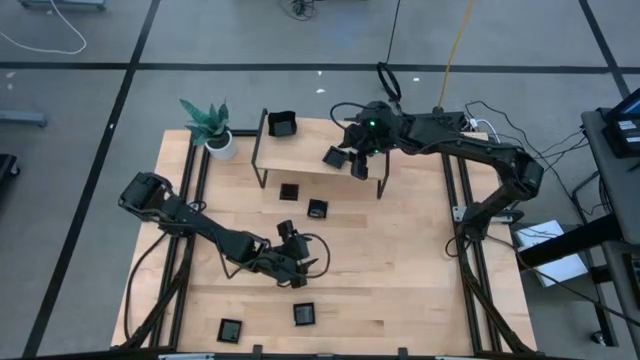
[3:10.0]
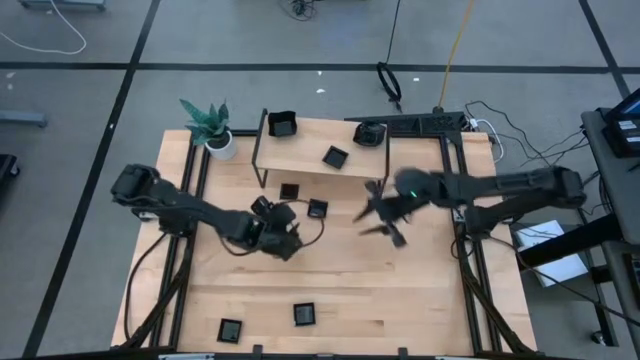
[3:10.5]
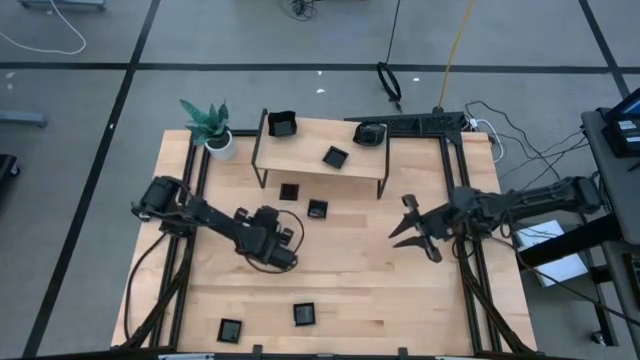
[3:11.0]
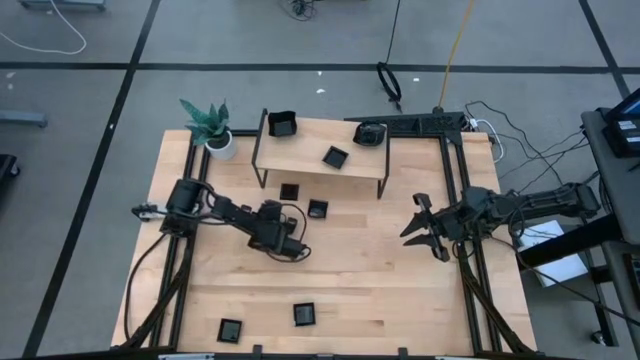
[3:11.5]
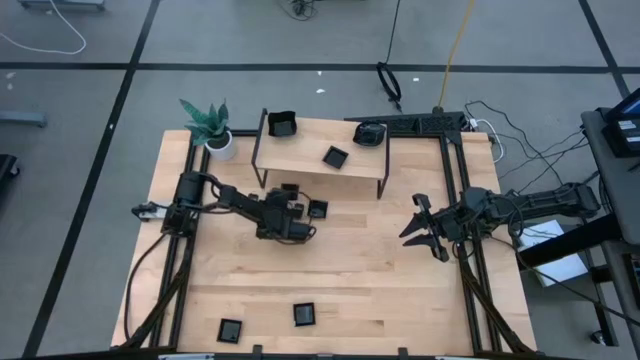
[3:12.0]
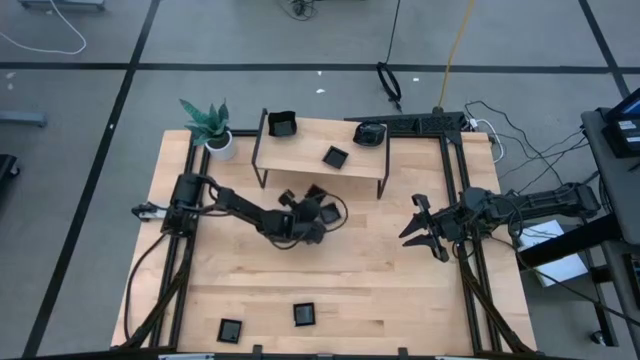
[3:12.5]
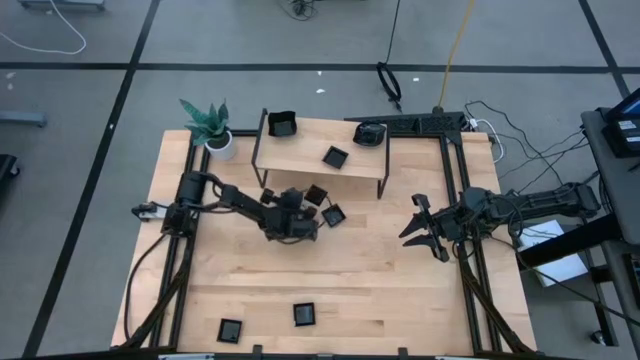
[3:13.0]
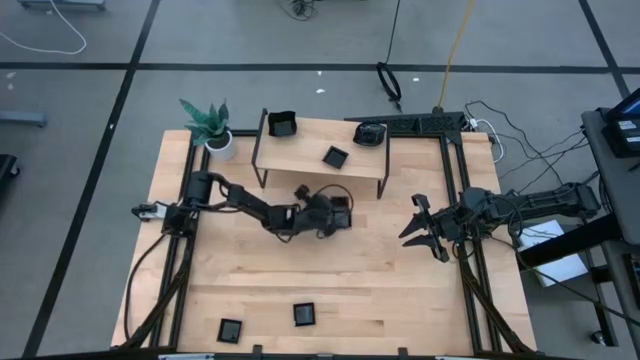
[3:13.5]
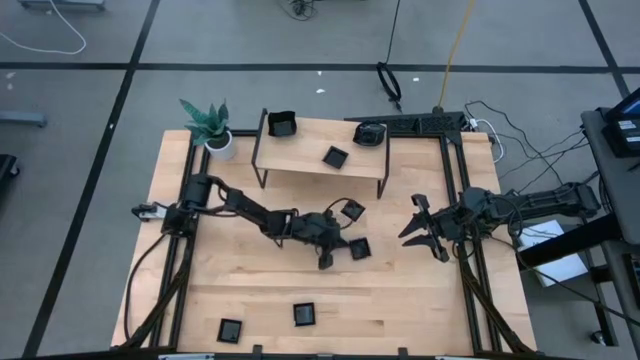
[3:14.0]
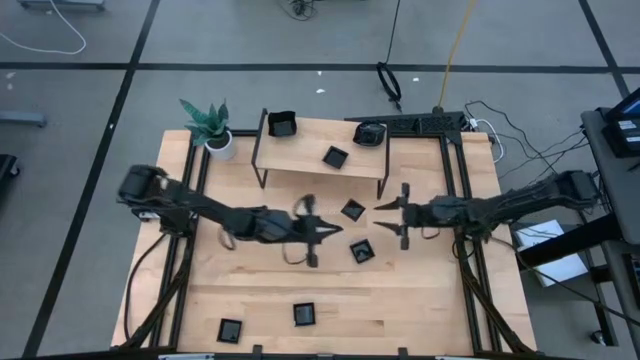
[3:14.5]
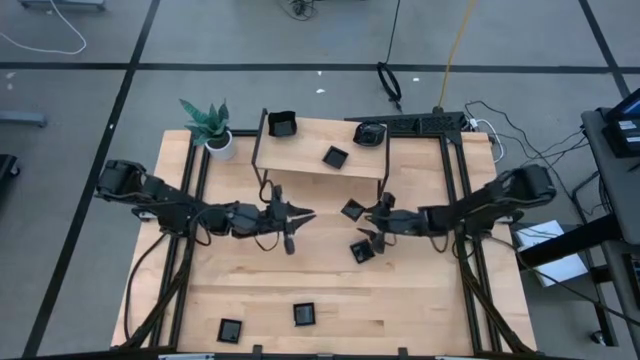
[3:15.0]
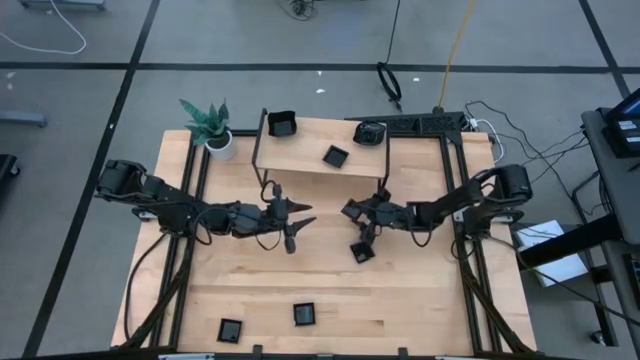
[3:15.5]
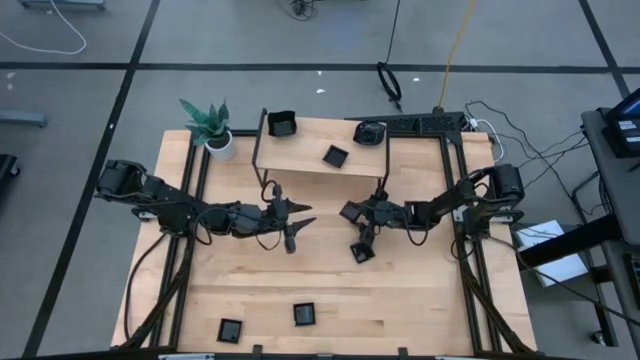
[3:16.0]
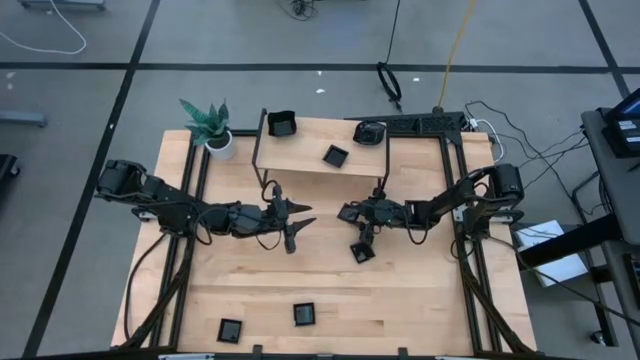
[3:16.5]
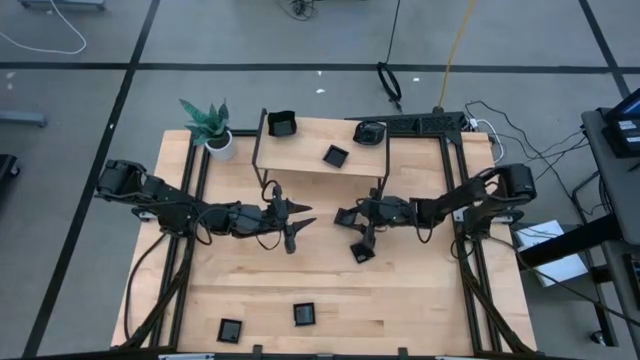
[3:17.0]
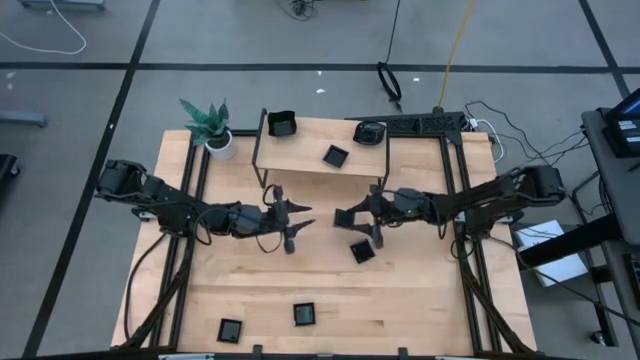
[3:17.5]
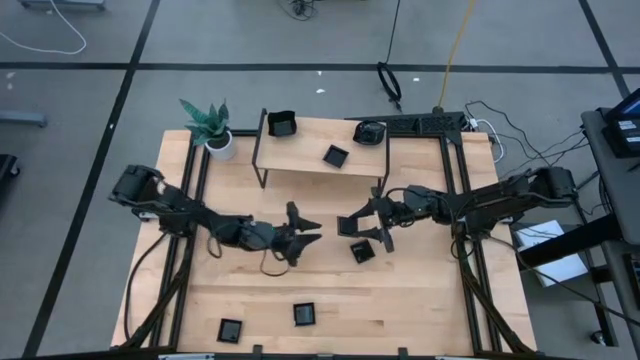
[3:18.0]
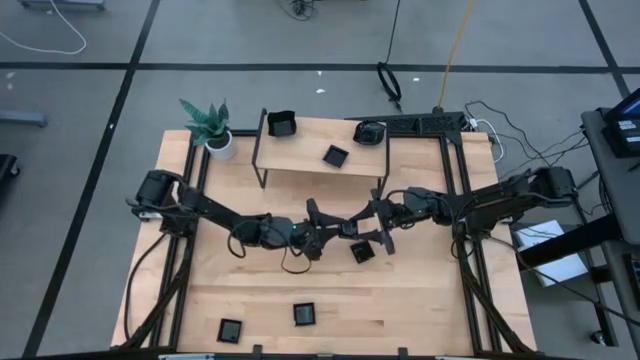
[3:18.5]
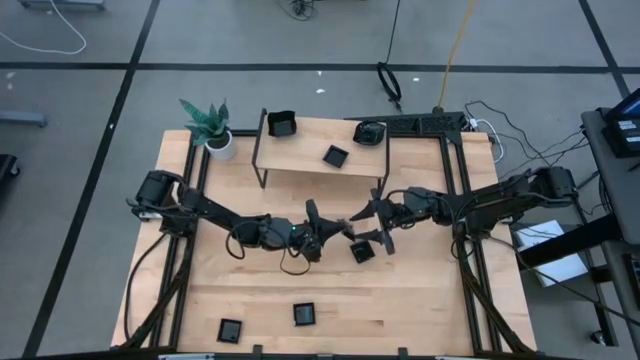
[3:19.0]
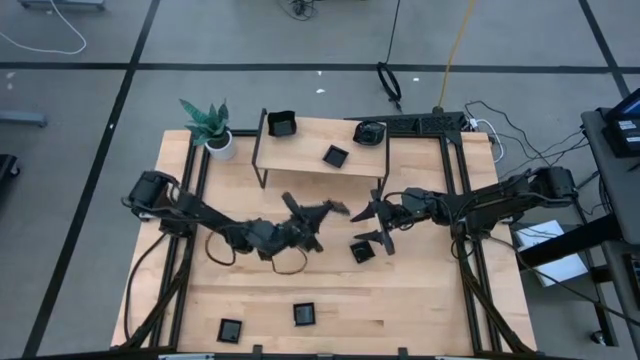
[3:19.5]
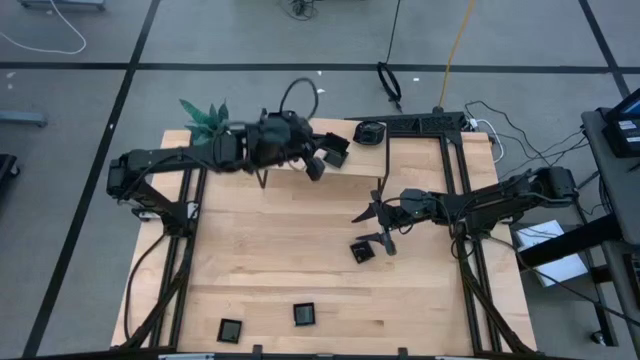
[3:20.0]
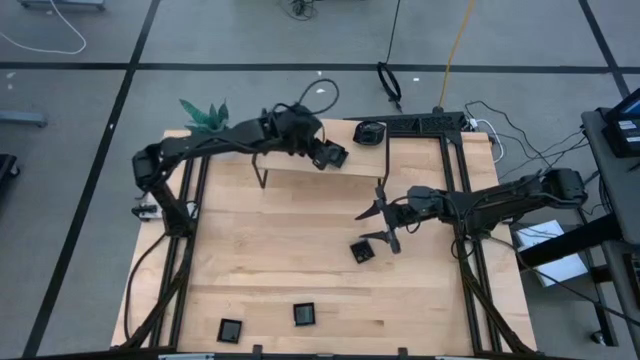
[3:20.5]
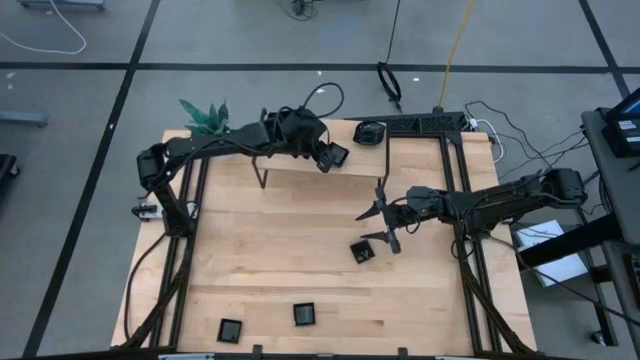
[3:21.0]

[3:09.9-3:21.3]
Task: Pick & Place Mini shaped plates
Stack the black square plate on top of the other black square plate on the shelf

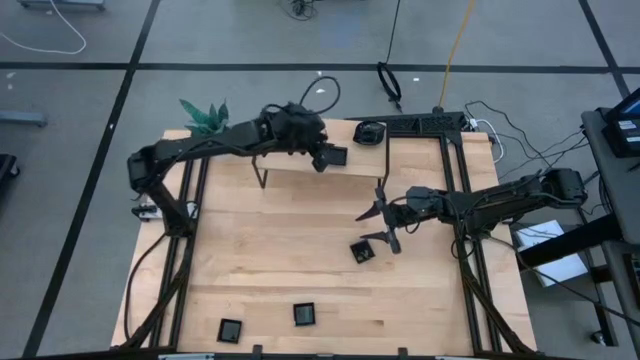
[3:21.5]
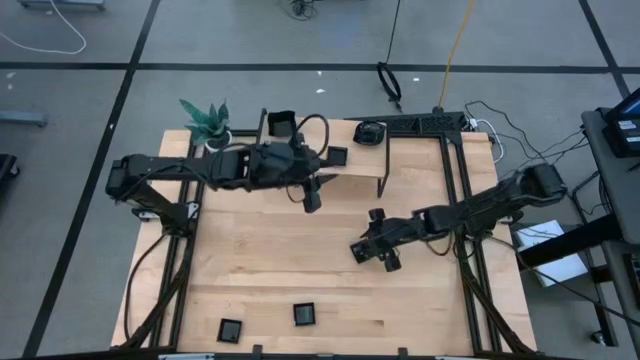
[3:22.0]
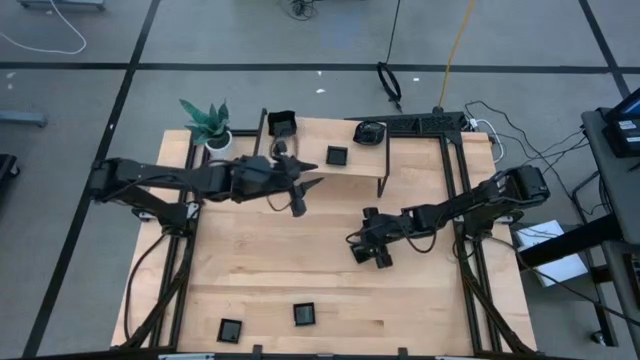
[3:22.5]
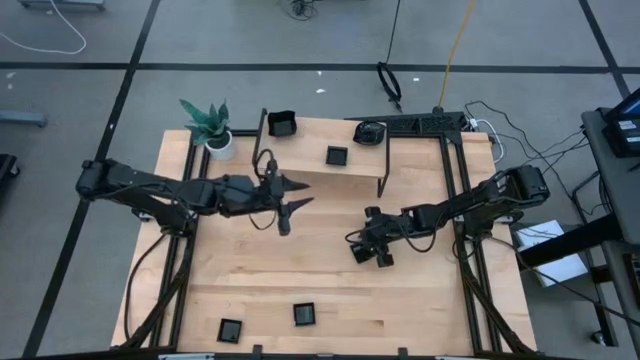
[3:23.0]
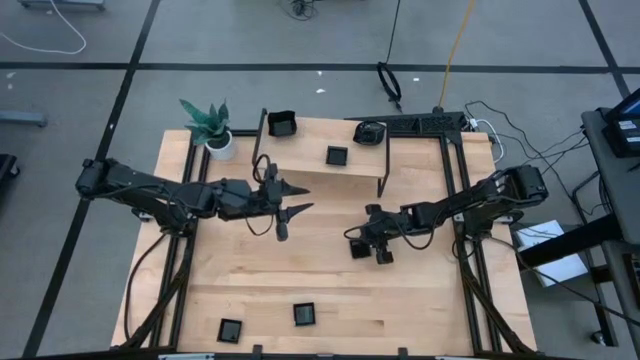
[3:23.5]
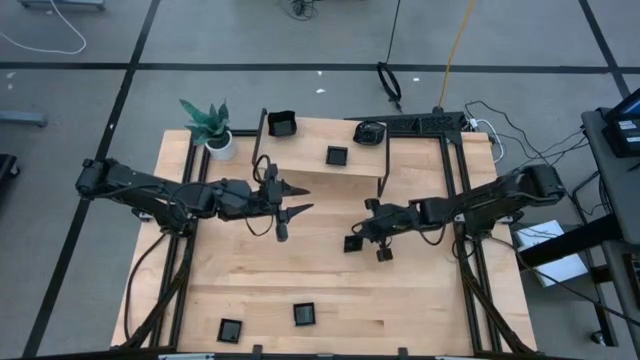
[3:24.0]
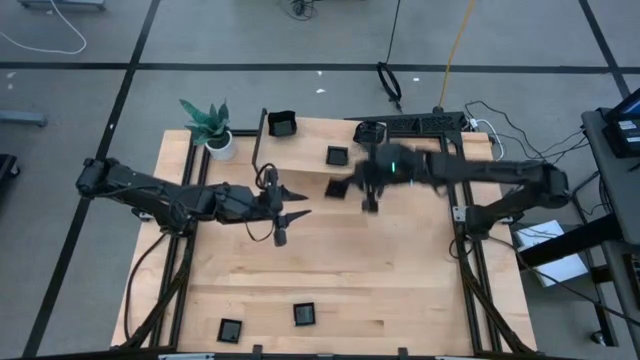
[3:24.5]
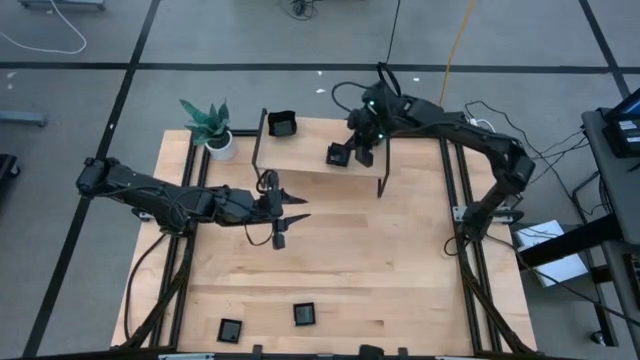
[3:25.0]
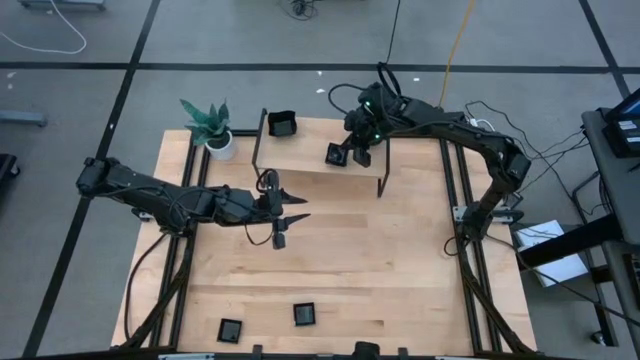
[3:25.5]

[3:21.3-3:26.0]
Stack the black square plate on top of the other black square plates on the shelf

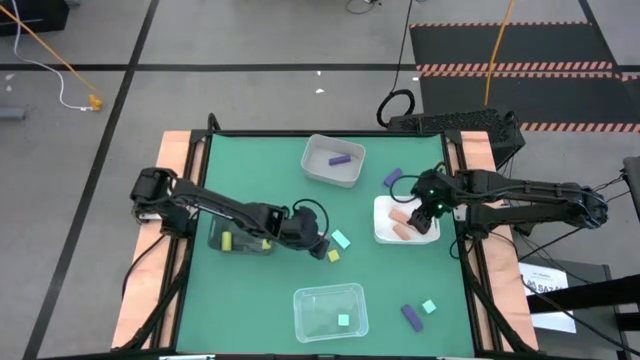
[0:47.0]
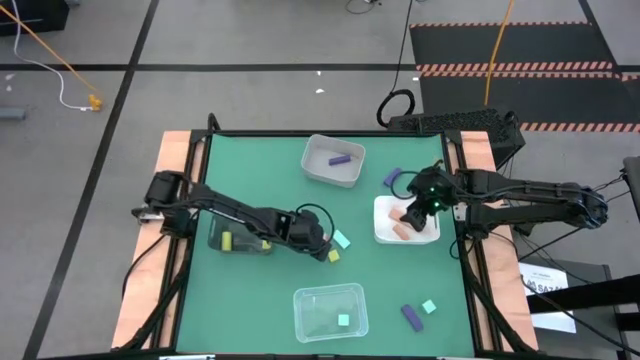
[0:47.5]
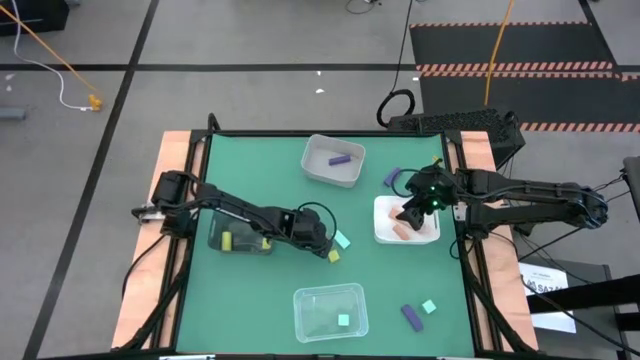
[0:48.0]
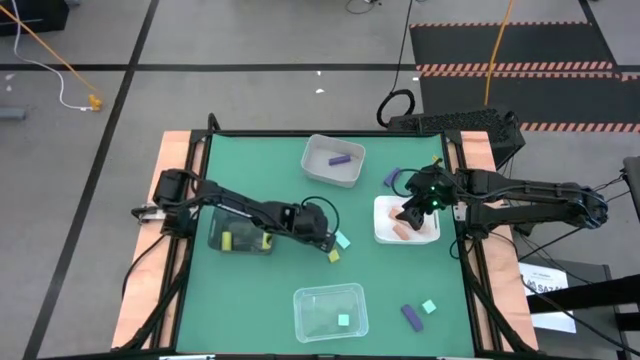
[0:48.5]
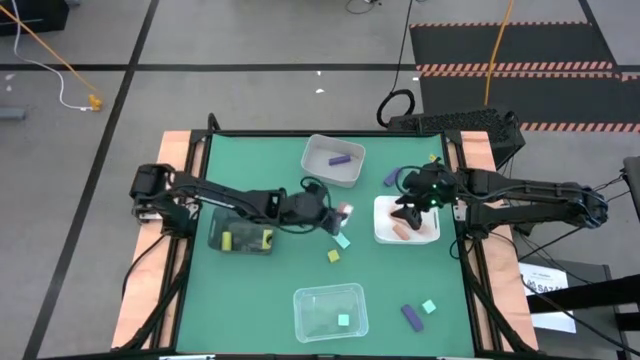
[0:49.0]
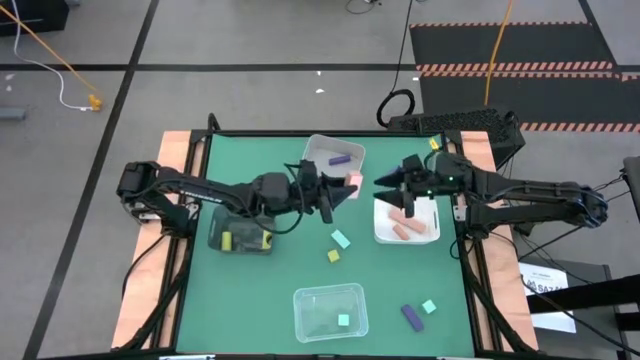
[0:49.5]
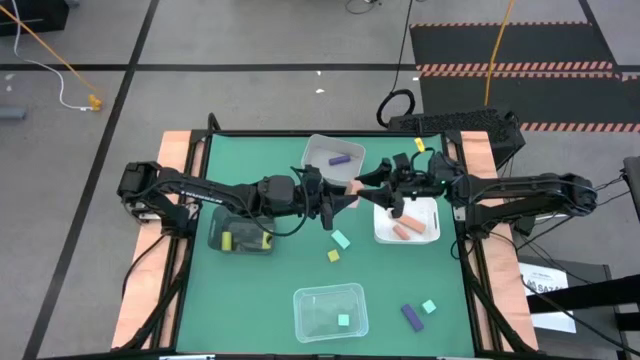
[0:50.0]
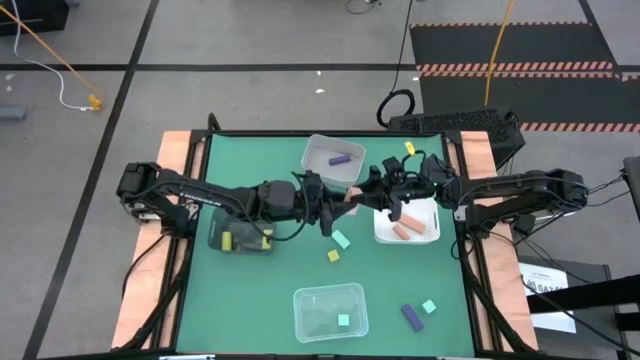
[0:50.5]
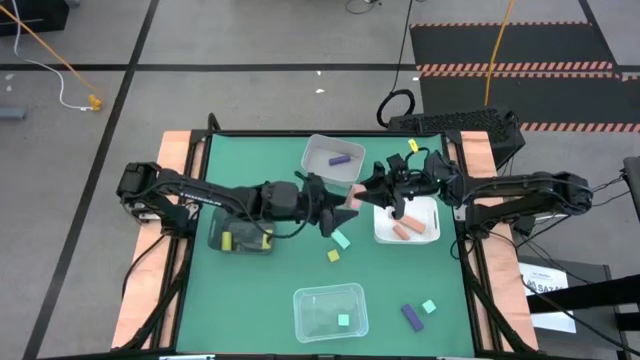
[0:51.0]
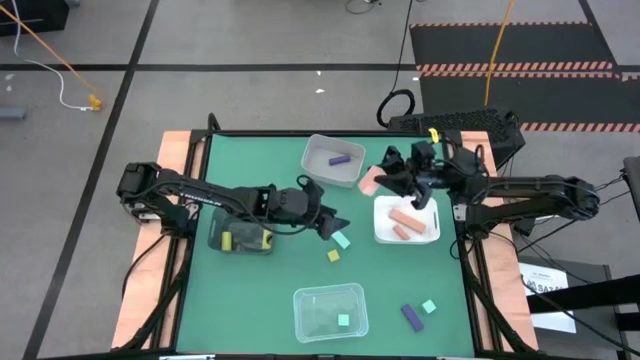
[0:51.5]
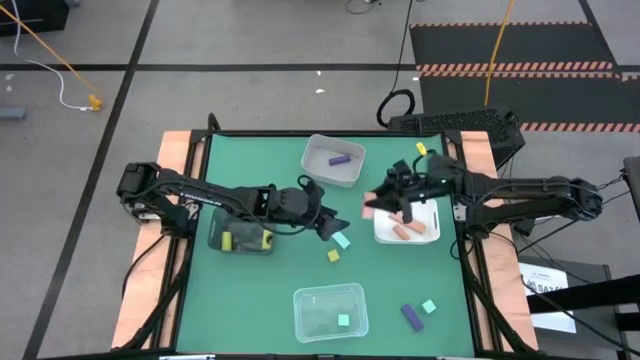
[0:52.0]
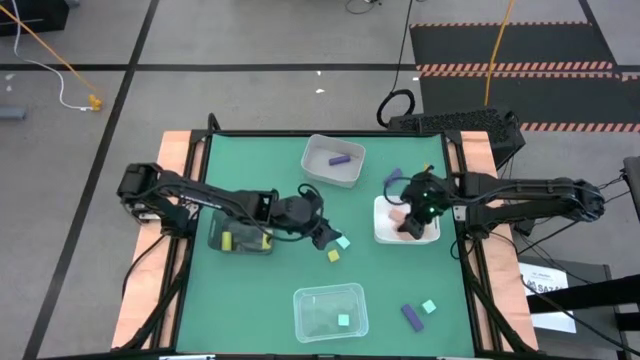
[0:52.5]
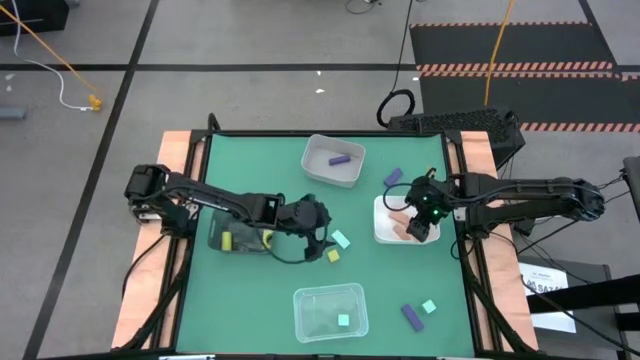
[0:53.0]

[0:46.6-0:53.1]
Task: Sort & place blocks by color
Put the pink block into the white bin
